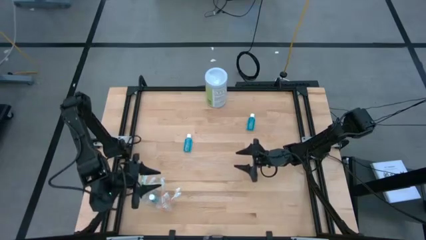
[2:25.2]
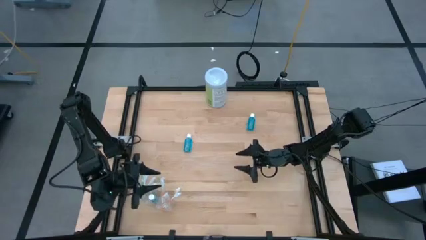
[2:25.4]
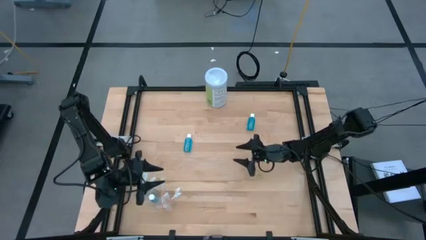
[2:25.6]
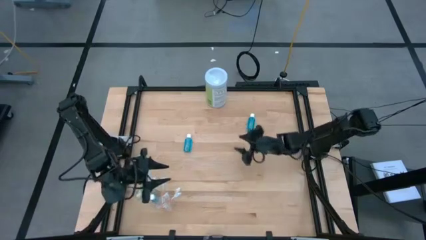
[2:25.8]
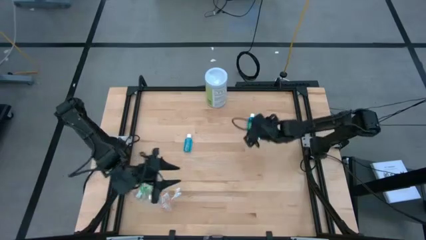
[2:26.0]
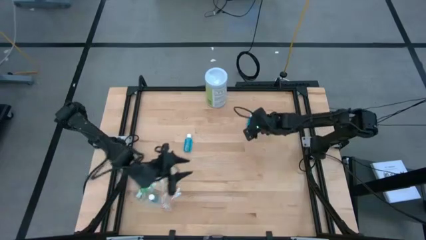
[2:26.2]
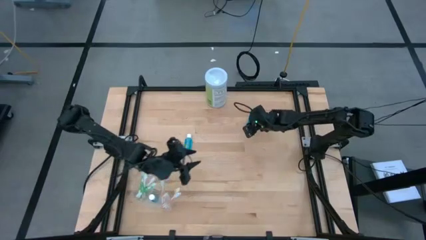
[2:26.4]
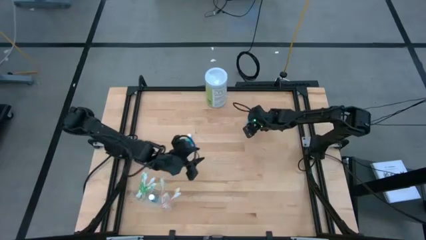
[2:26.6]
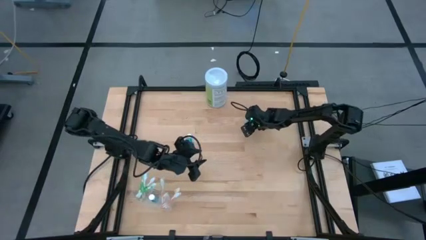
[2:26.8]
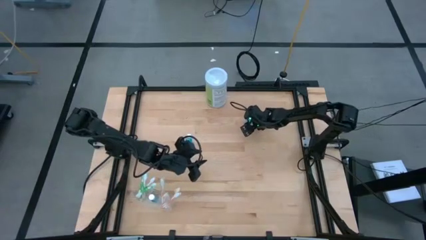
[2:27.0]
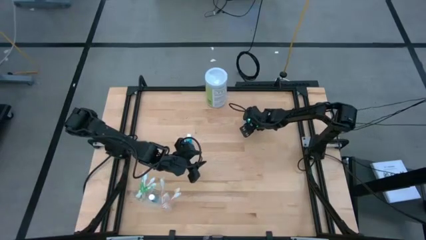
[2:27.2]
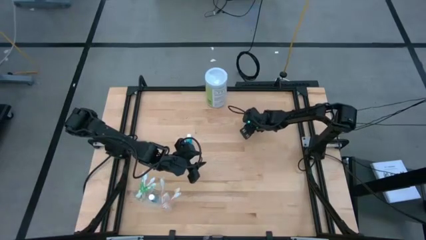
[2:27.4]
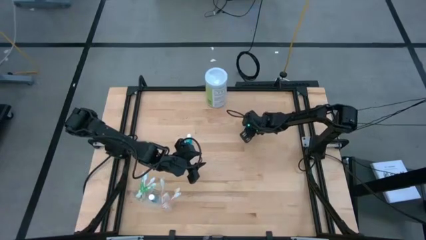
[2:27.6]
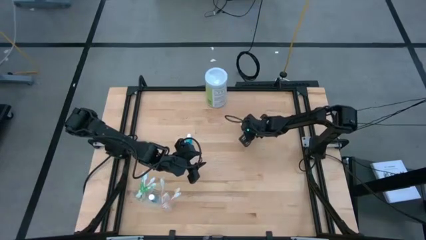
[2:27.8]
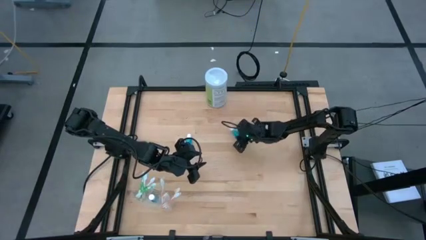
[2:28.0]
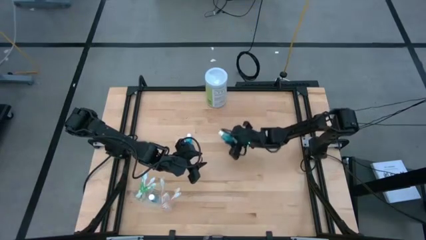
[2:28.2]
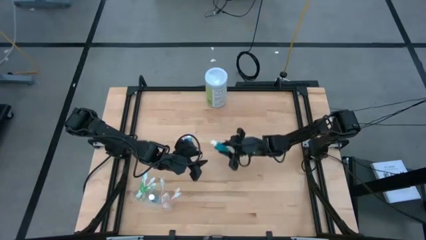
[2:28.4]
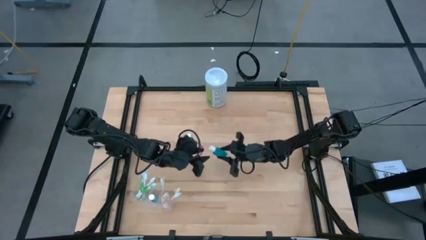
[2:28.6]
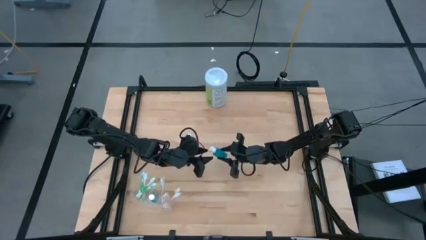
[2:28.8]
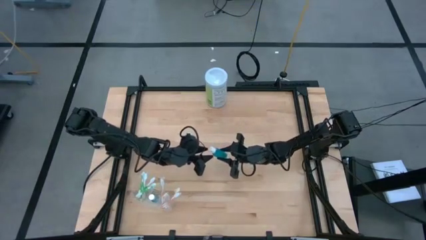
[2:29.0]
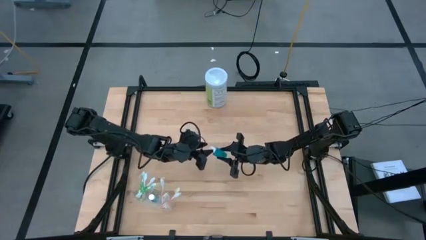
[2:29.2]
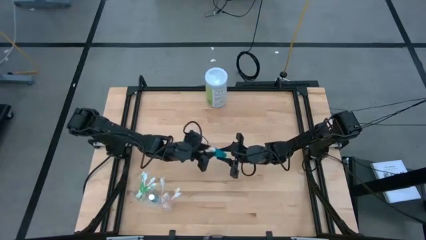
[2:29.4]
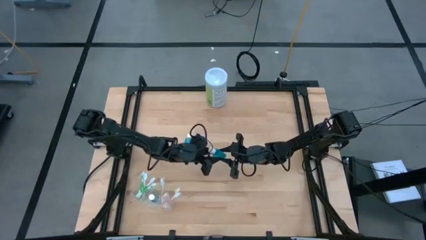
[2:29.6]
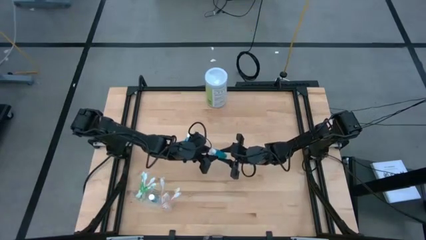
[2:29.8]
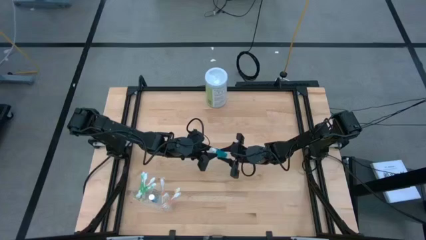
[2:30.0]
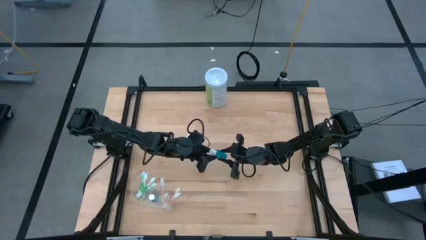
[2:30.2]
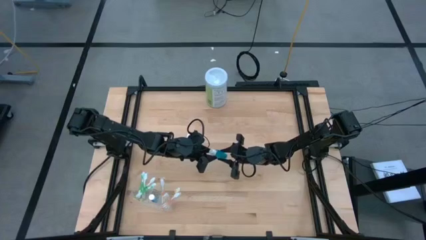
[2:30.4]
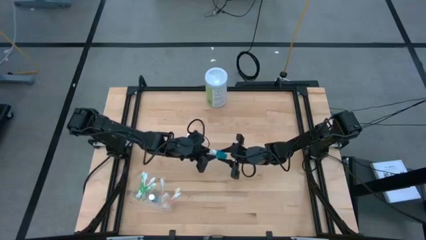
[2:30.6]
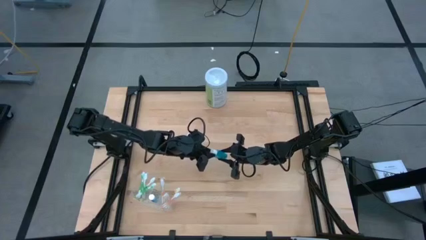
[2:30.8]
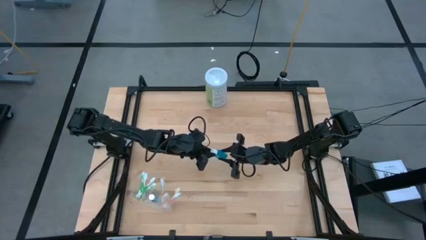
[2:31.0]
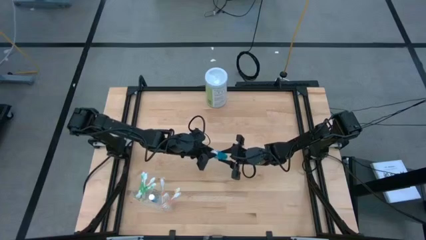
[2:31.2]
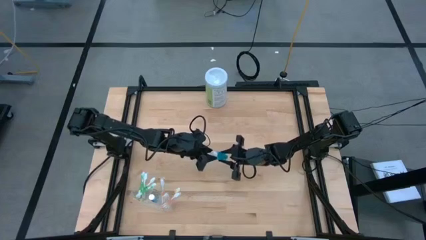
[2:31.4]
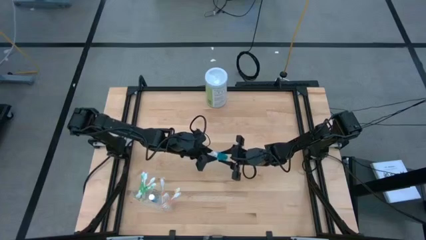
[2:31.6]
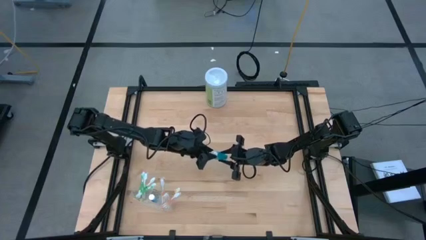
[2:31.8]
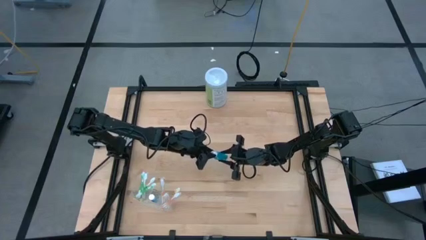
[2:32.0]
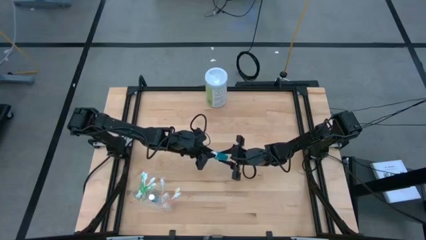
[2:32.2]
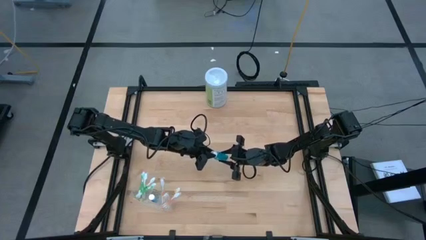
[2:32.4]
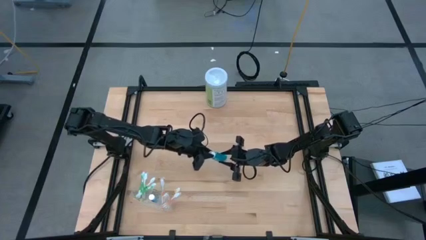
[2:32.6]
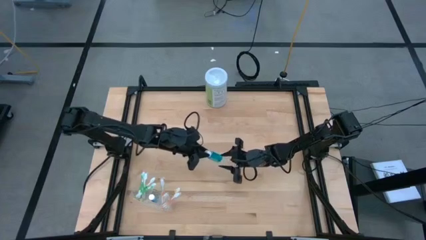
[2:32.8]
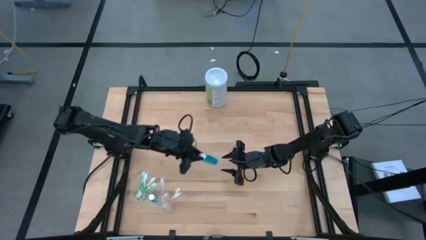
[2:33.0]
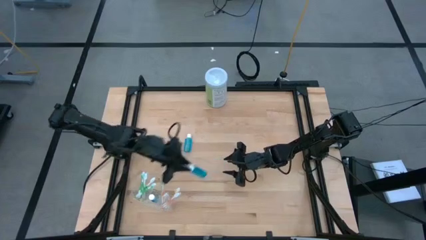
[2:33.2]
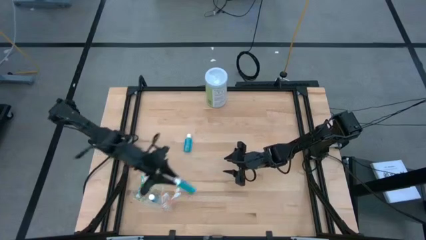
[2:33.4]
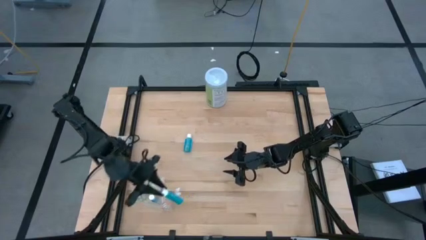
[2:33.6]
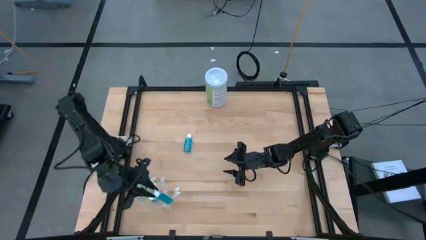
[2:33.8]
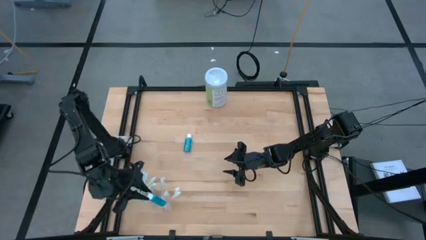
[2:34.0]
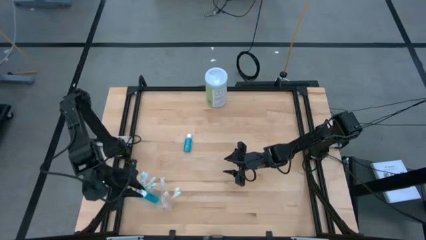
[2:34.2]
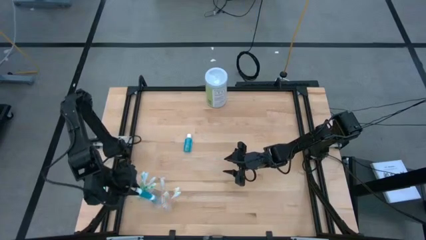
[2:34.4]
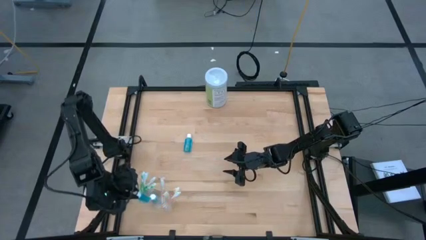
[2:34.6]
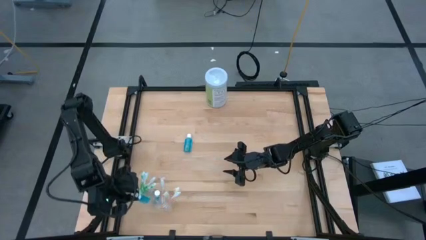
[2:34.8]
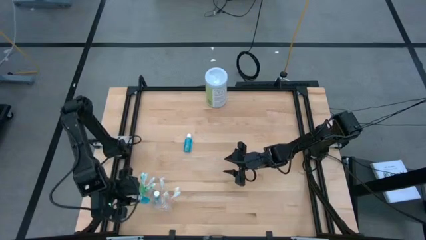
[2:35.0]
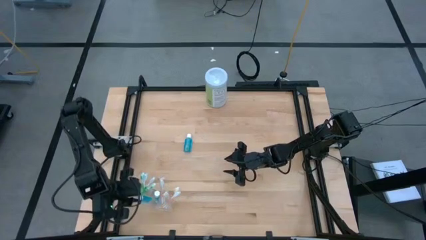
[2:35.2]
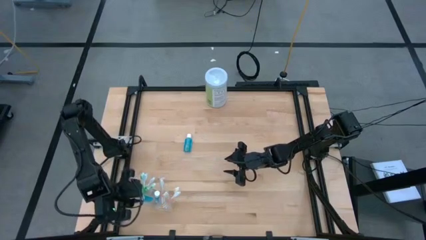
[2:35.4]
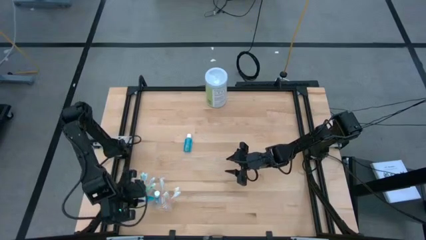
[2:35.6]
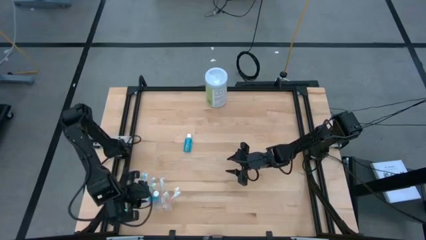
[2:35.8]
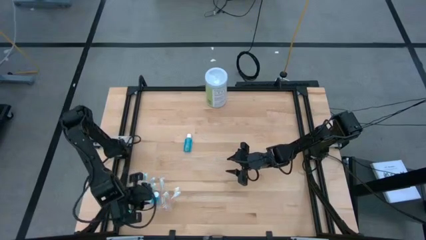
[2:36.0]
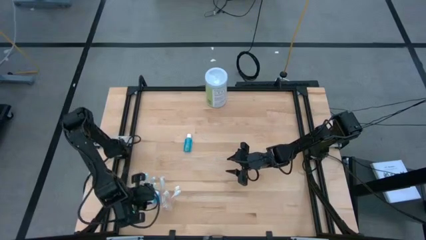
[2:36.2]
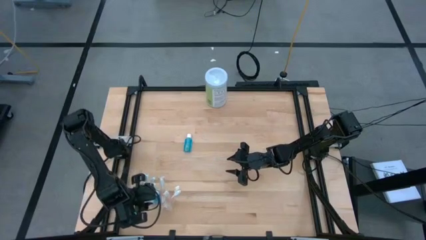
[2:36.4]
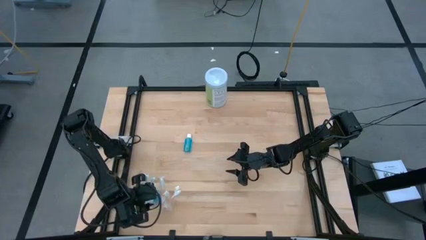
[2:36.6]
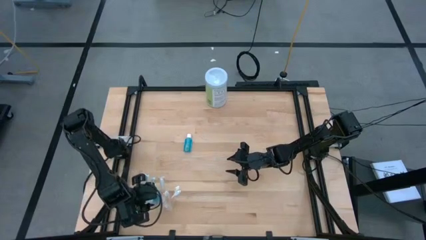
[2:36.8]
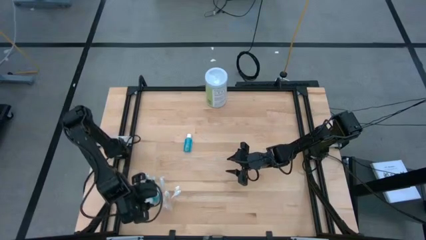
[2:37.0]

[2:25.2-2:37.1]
Task: Pick & Place toothbrushing station
Put the blue mouthwash into the transparent organizer

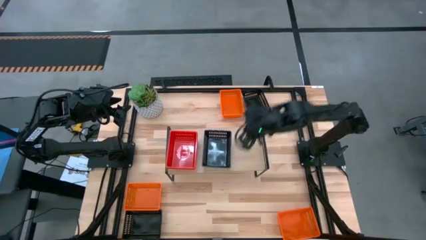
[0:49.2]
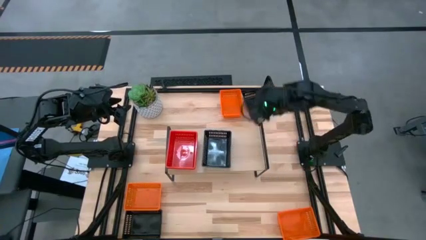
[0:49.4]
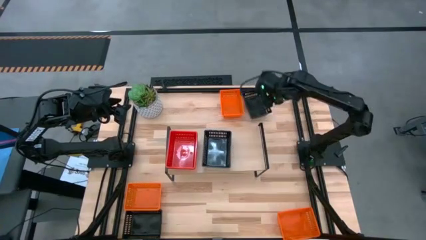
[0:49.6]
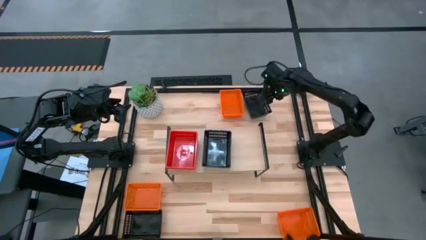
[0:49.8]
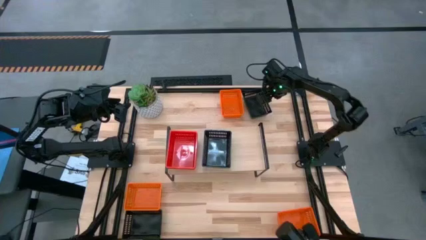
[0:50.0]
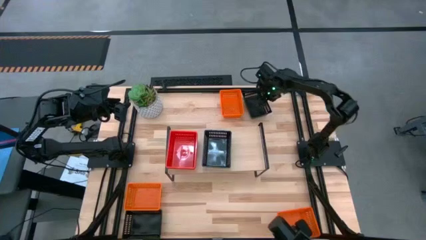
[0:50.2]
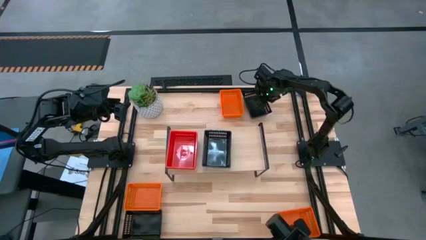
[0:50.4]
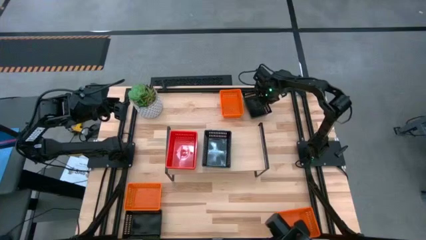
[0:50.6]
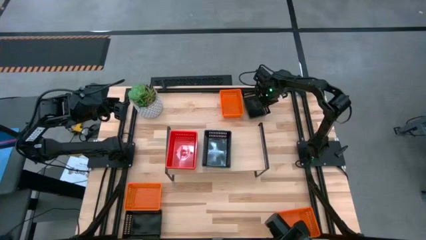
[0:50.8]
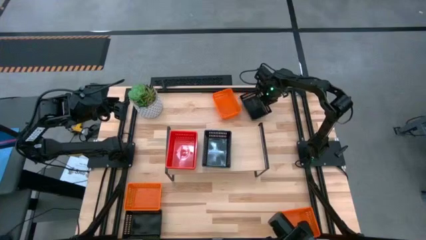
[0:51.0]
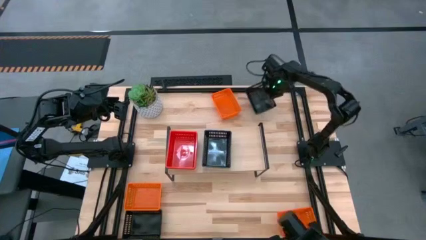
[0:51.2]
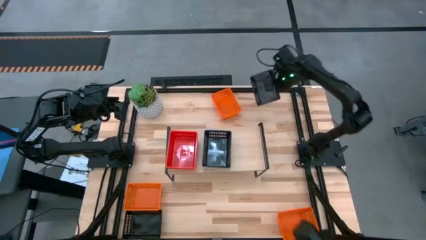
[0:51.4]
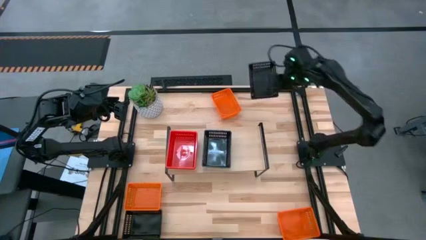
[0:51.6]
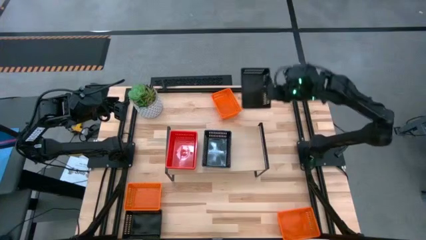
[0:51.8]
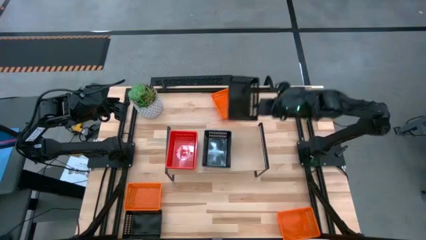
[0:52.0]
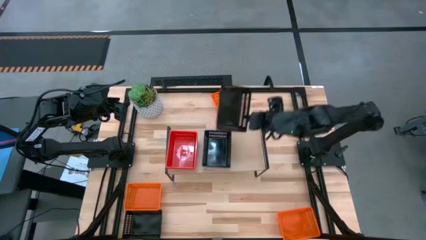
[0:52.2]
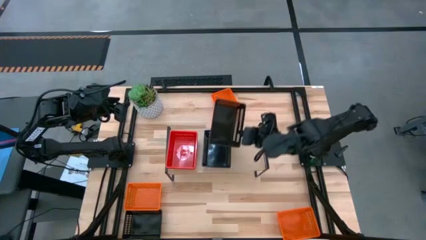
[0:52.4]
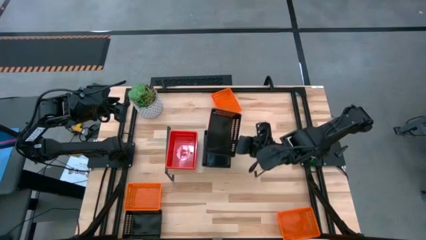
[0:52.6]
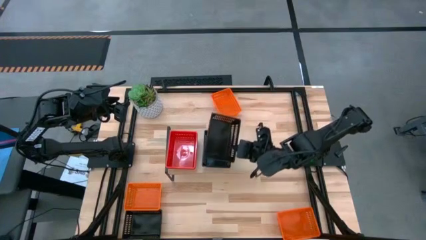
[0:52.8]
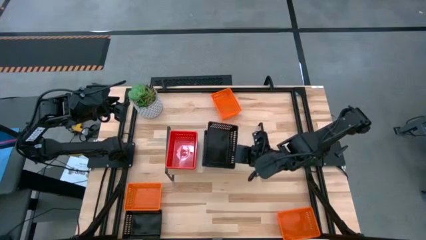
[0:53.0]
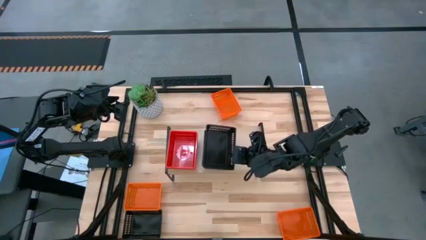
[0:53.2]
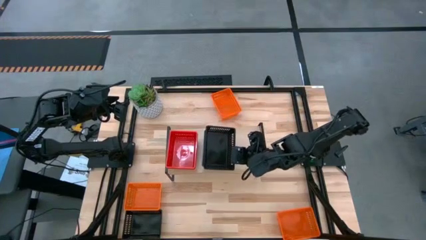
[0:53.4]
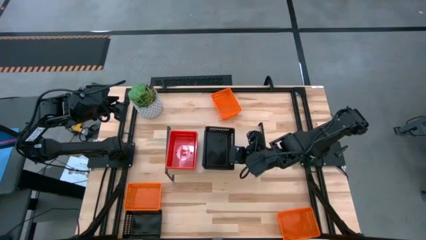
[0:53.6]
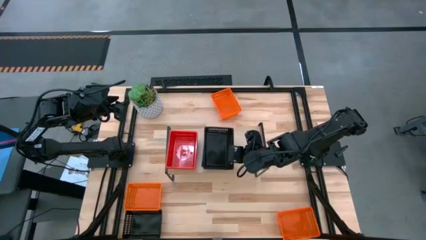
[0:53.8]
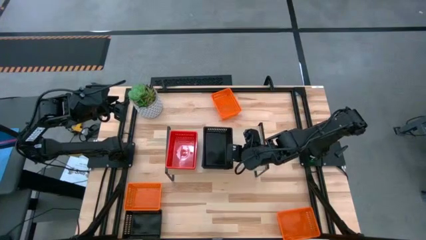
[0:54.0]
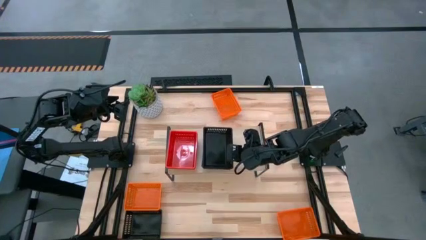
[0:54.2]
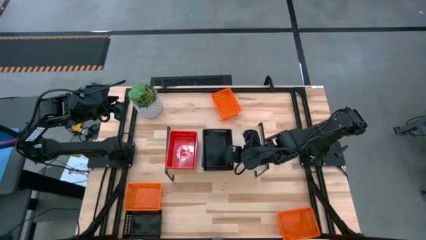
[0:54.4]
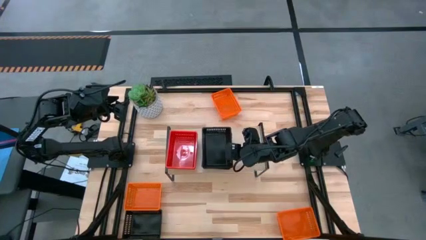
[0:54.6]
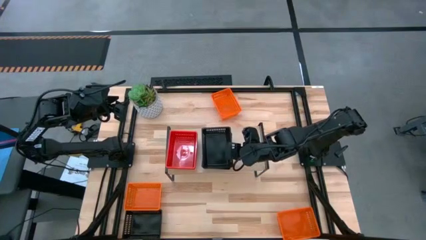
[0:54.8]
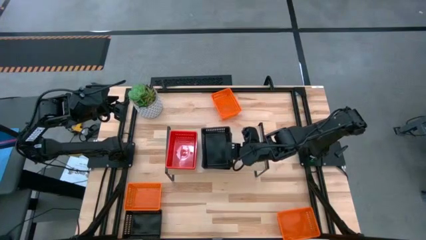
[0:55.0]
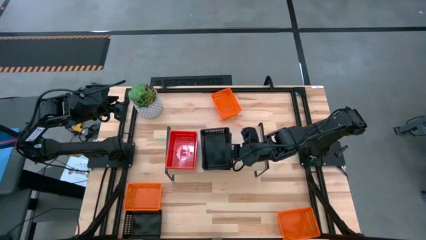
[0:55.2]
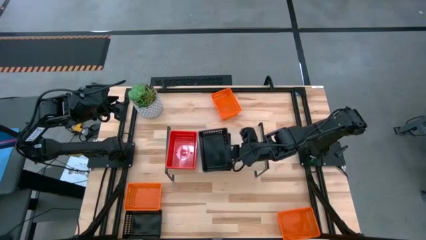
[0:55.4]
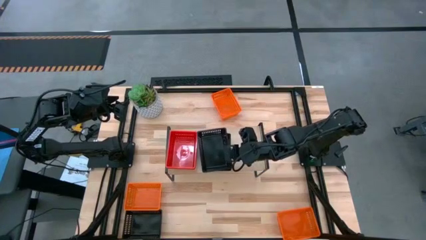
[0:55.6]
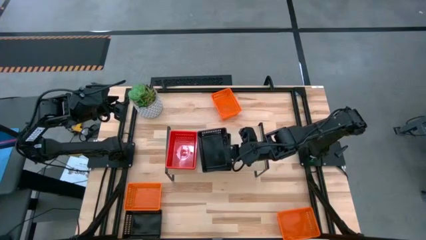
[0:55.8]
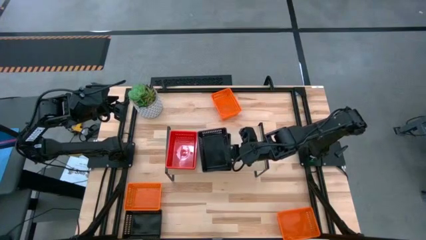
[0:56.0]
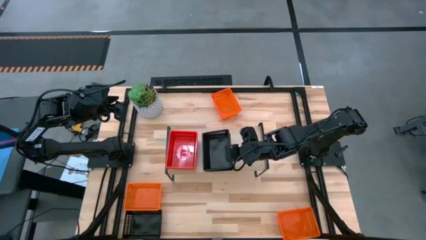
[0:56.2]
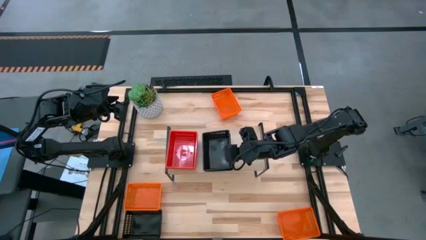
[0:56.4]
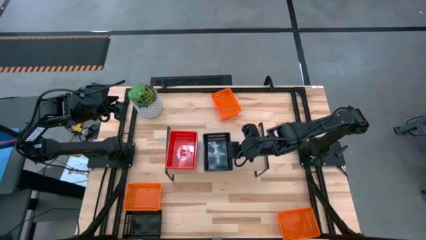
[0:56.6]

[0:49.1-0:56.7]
Task: Stack baskets on shelf by color
Stack the top black bin on top of the other black bin on the shelf
